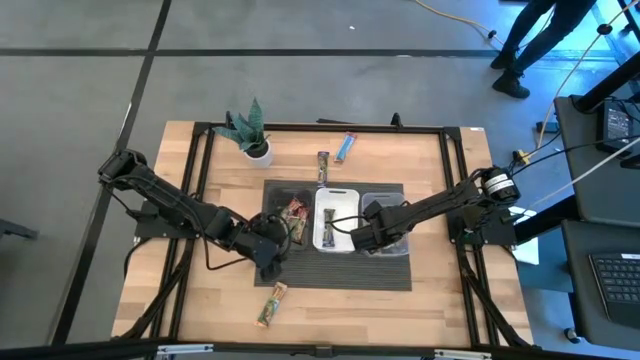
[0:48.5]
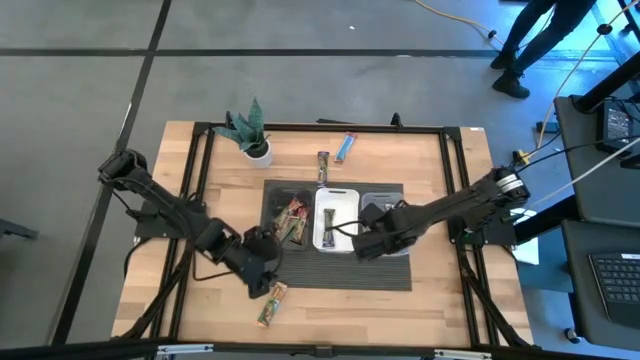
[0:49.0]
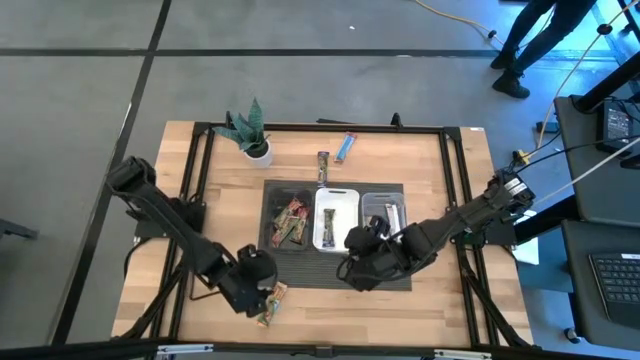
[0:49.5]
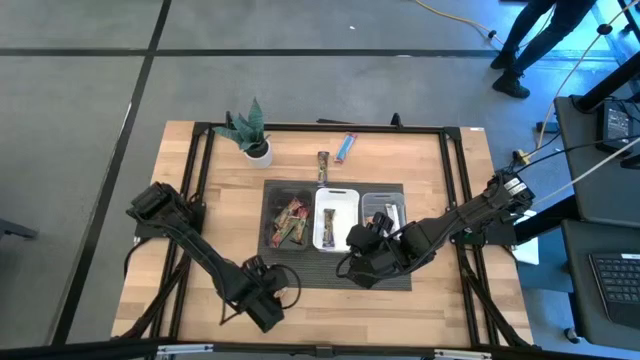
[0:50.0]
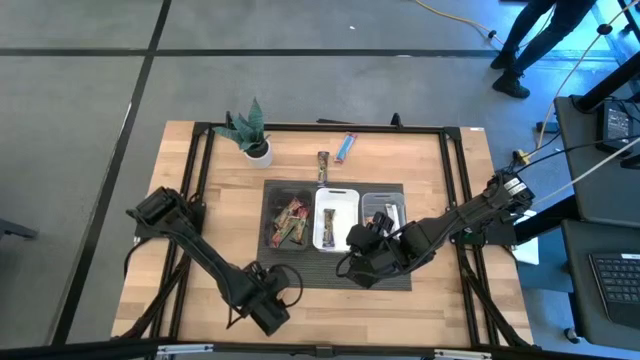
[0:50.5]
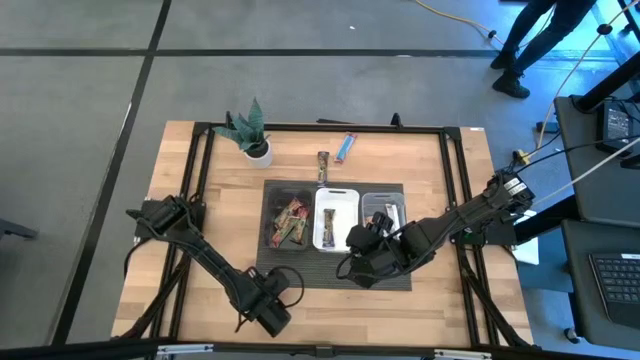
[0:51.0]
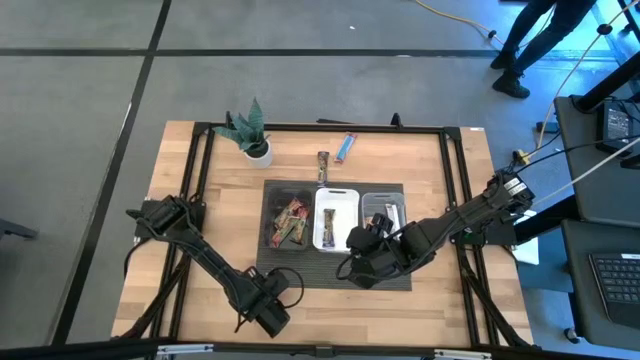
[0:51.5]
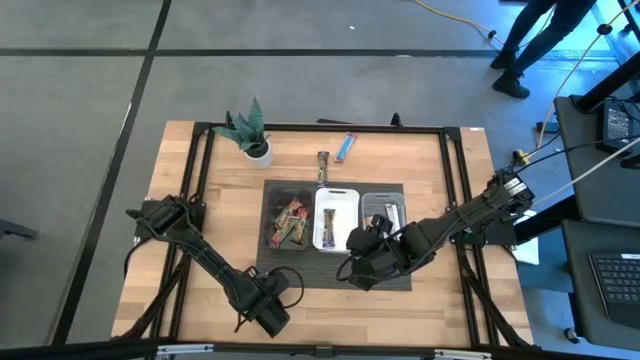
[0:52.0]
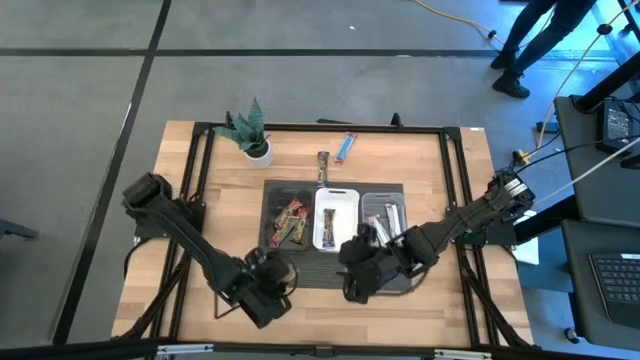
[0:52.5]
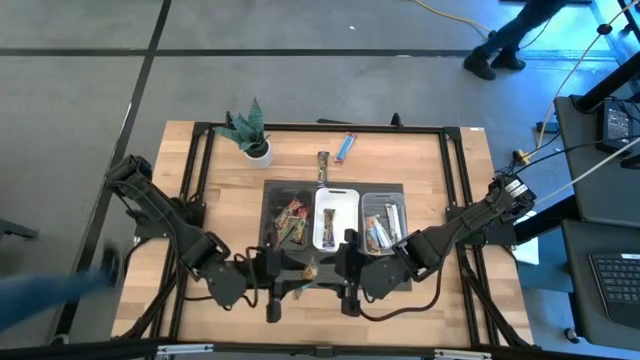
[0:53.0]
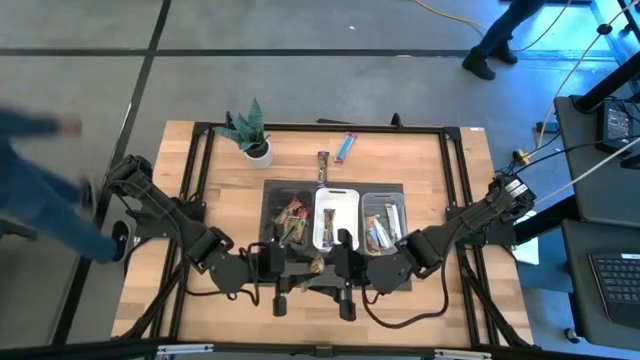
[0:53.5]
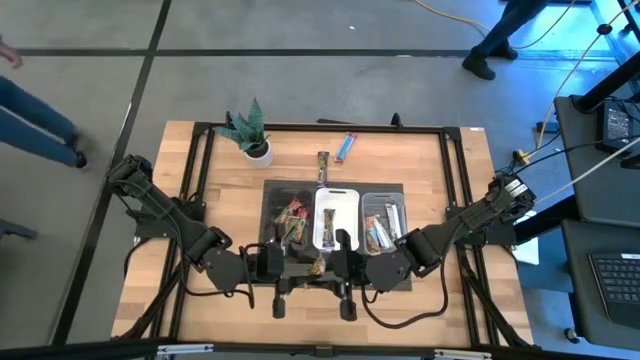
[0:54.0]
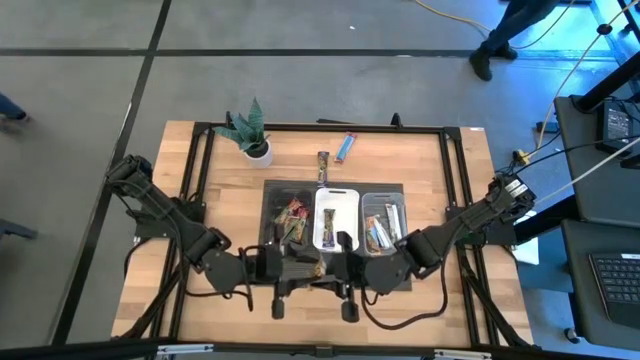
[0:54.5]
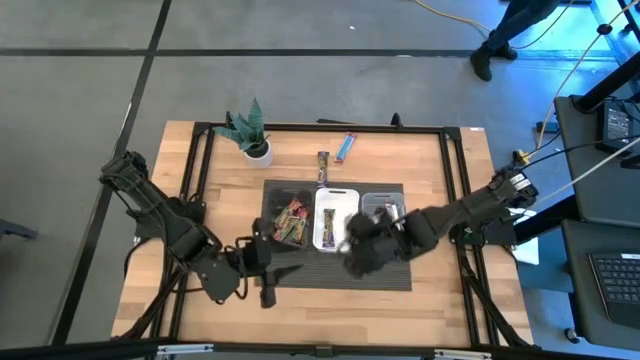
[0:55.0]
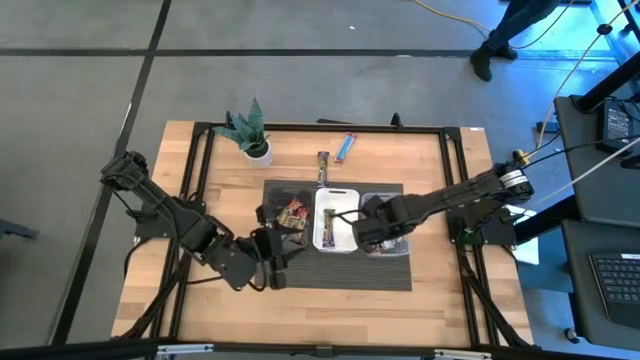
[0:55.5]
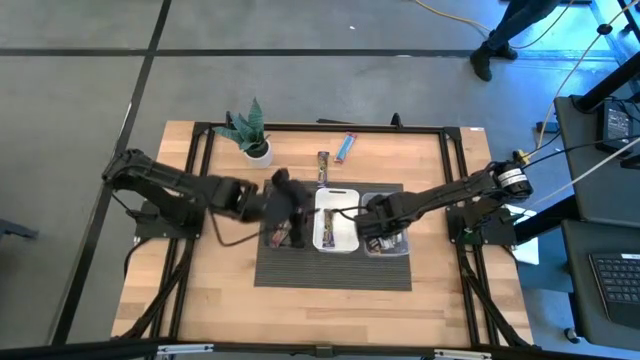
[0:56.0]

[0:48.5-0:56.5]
Task: Pick and place Granola Bars by type
Put the yellow granola bar into the transparent bin

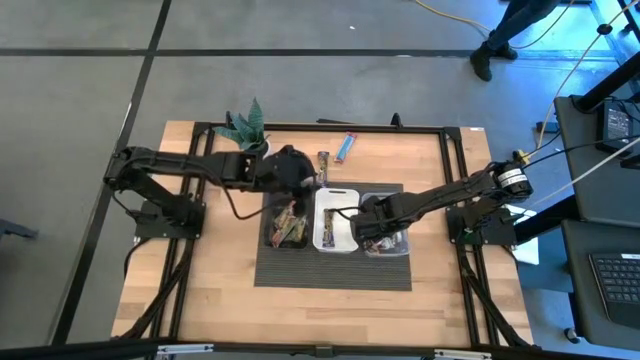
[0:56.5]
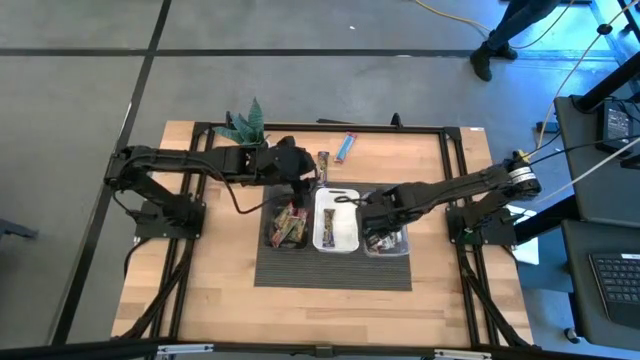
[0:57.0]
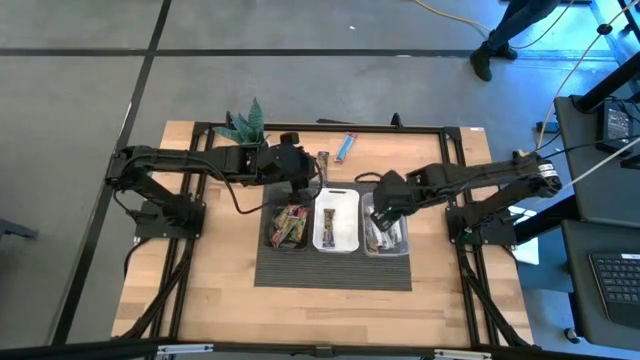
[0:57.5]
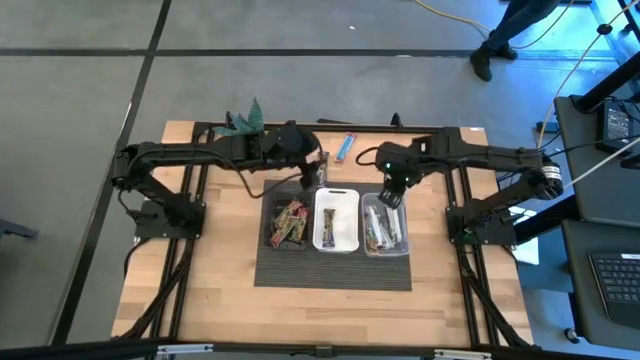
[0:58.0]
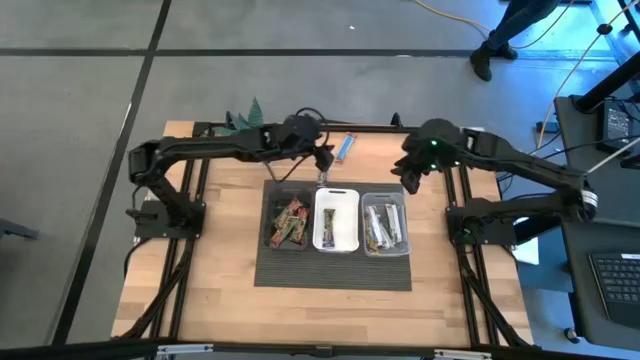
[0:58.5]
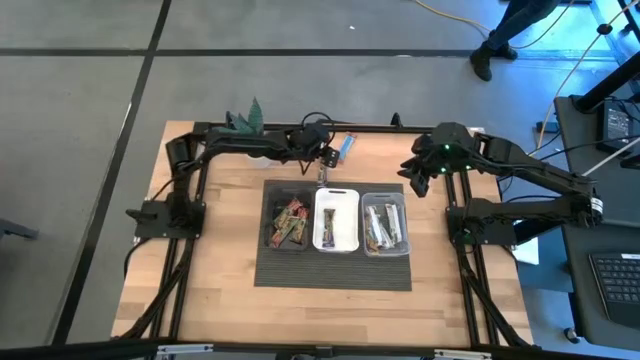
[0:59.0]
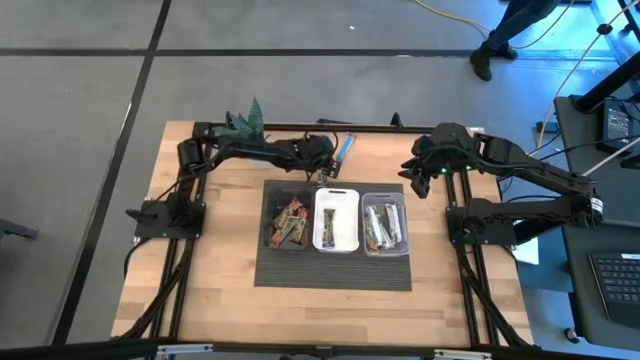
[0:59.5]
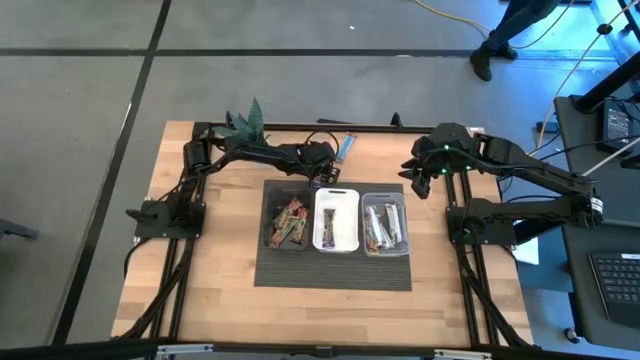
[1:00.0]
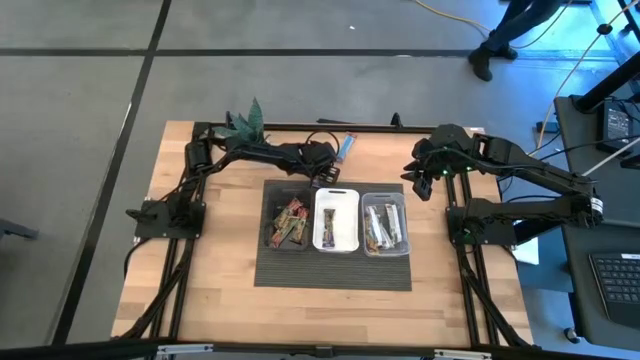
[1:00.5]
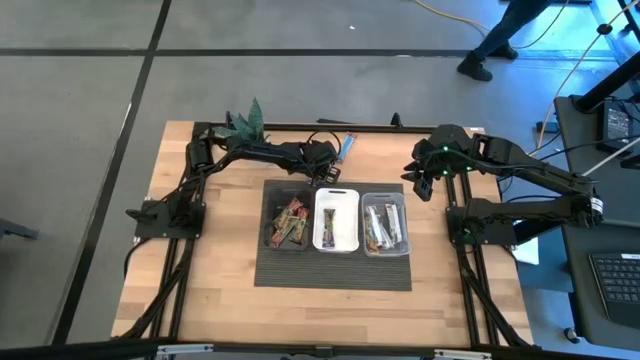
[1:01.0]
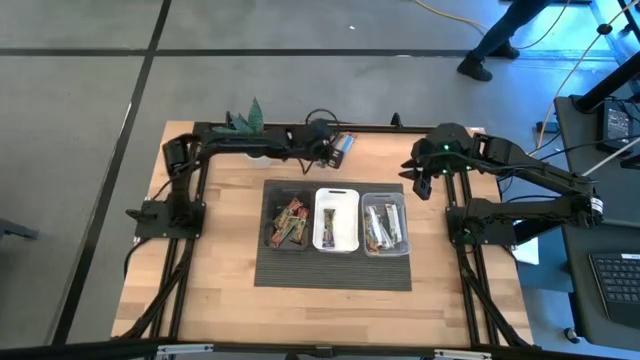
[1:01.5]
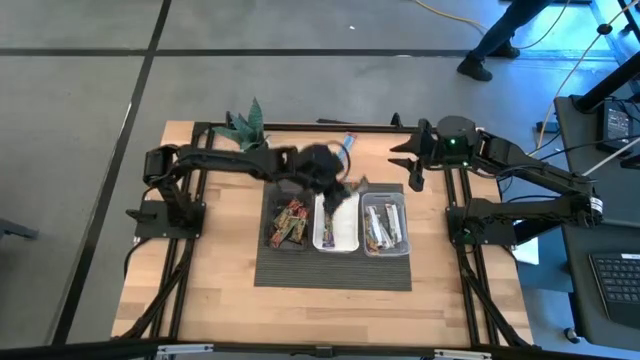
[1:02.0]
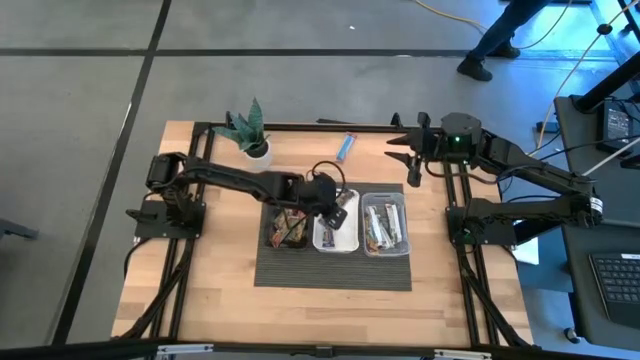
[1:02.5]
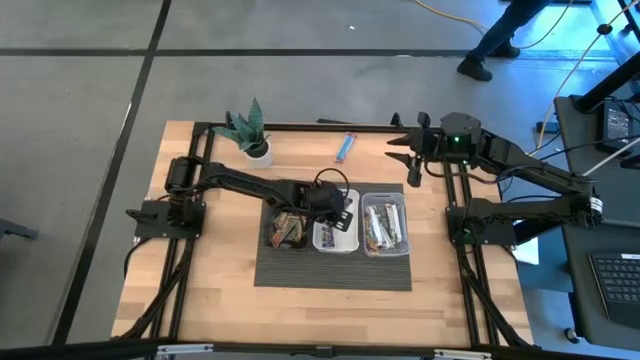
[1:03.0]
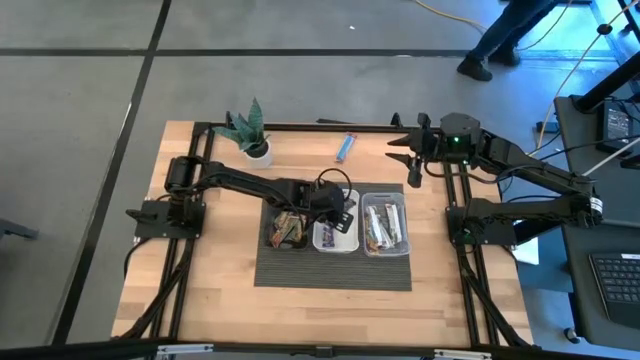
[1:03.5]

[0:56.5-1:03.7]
Put the blue granola bar into the white bin

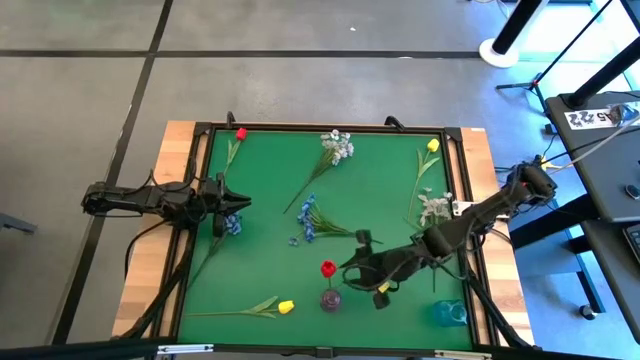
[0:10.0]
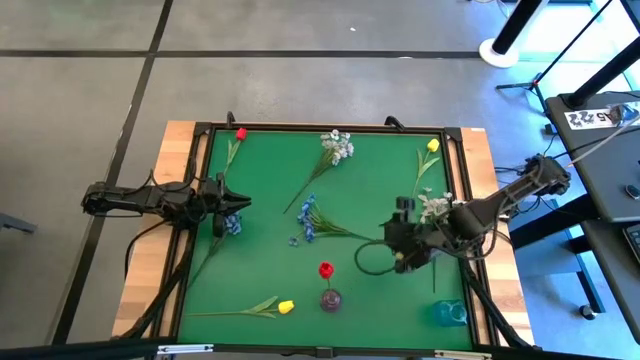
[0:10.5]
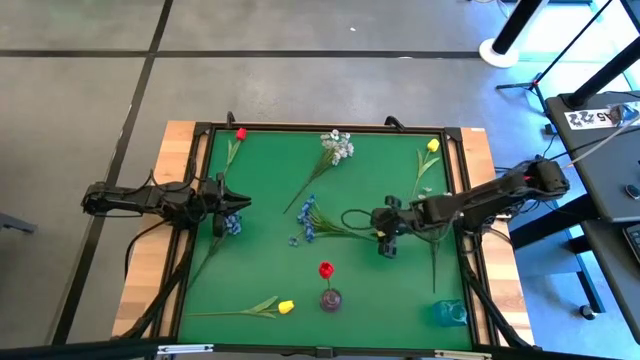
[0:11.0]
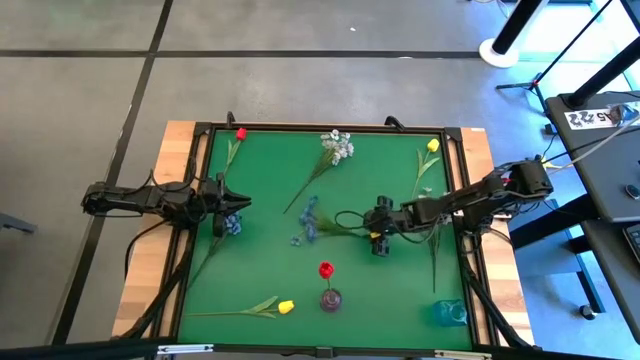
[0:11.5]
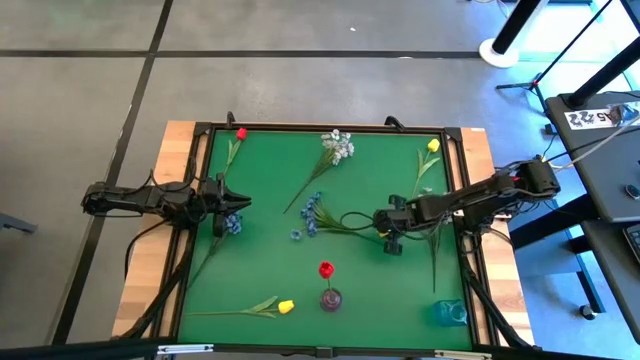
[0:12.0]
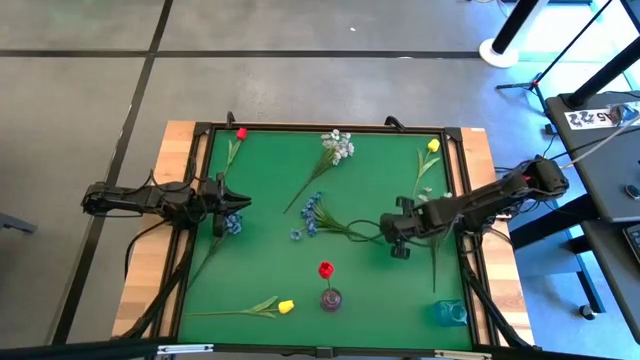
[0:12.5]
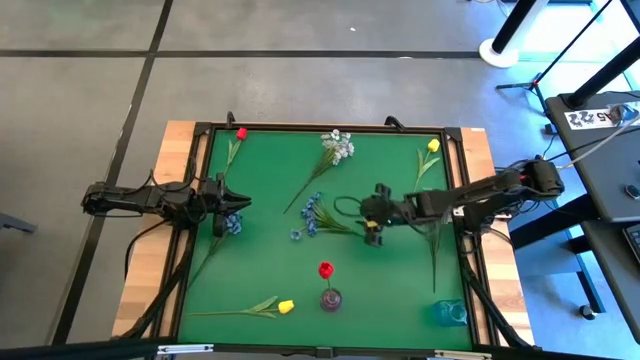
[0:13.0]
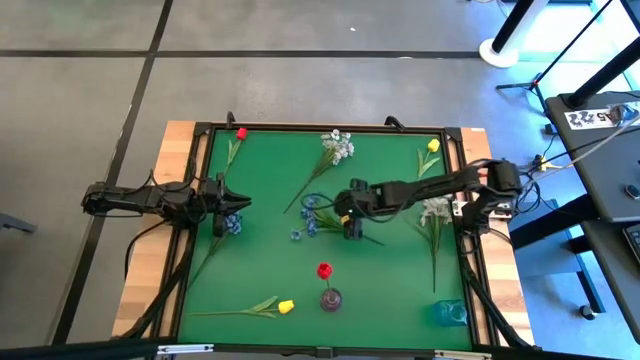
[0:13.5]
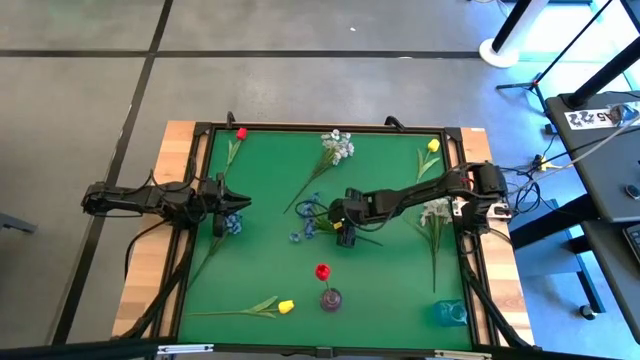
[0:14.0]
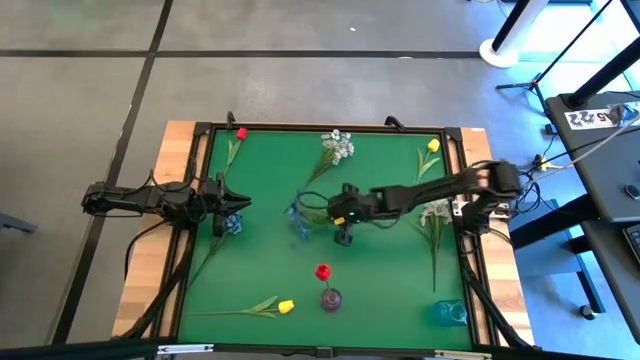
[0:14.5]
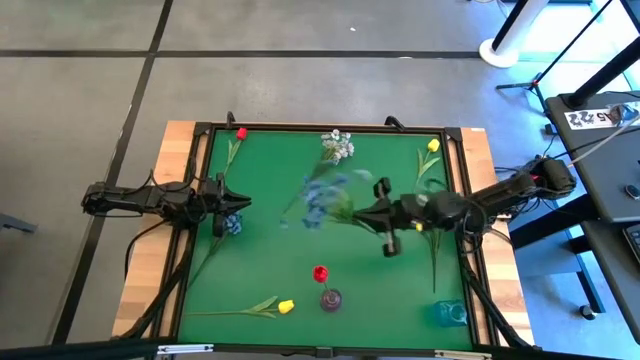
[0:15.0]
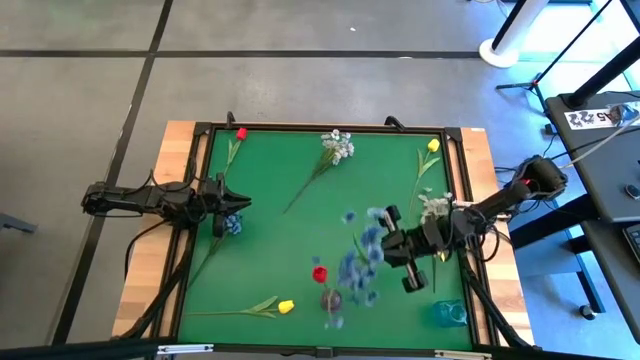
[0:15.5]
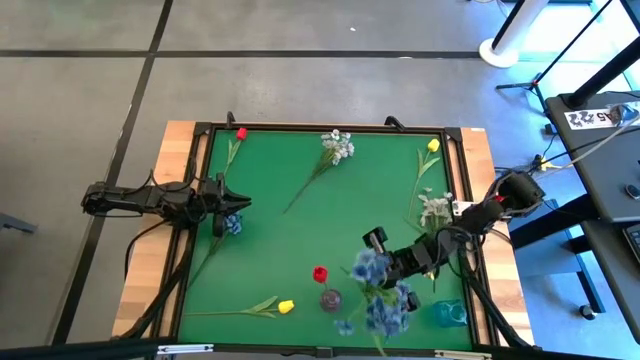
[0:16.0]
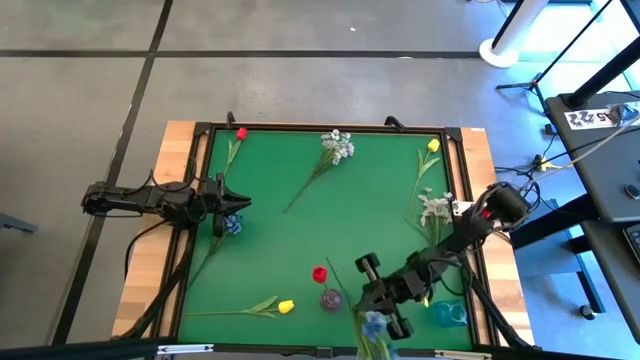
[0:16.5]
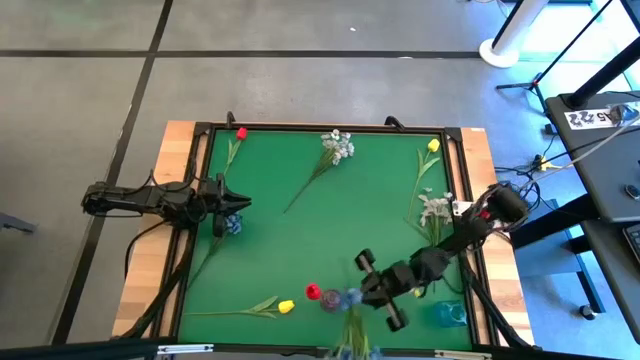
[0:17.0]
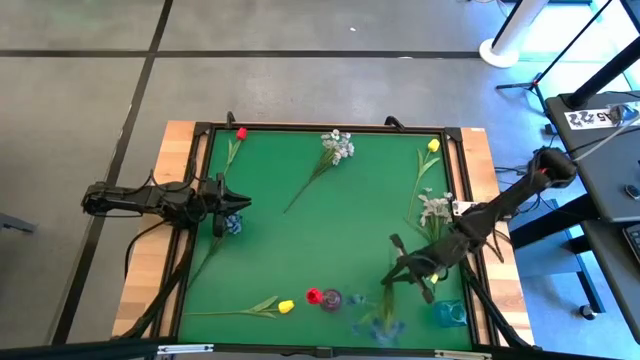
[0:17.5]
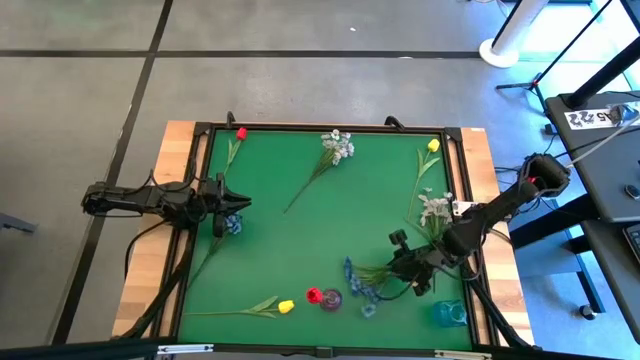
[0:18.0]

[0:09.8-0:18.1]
Task: Sort flowers into vase by color
Put the right blue flowers into the violet vase
